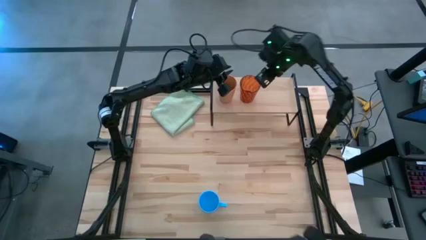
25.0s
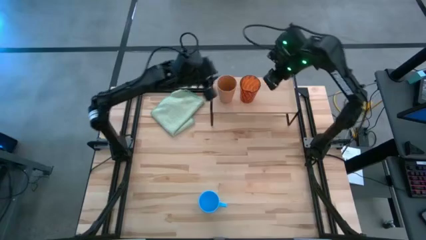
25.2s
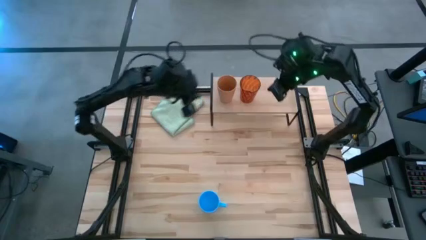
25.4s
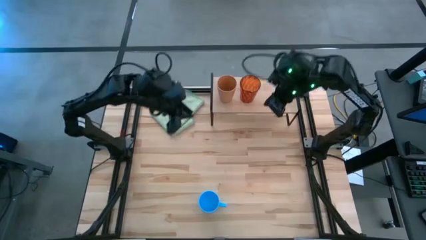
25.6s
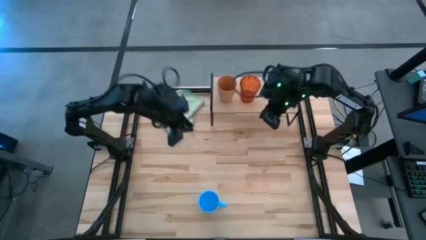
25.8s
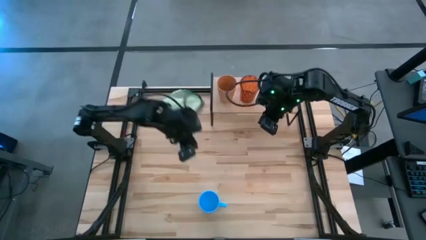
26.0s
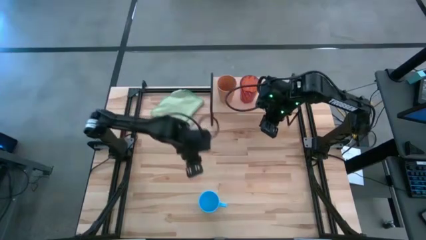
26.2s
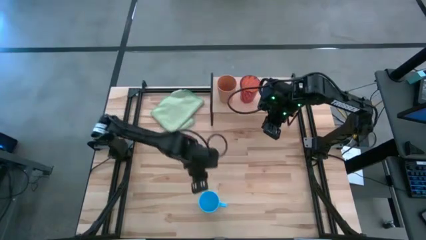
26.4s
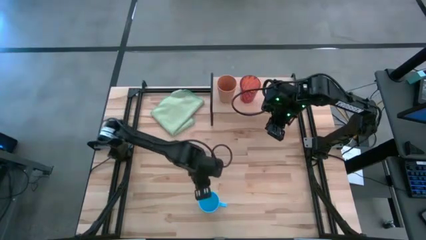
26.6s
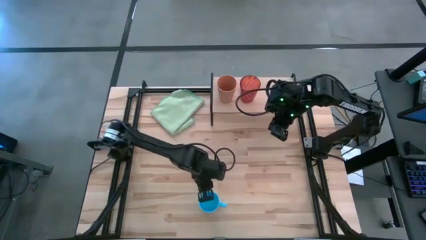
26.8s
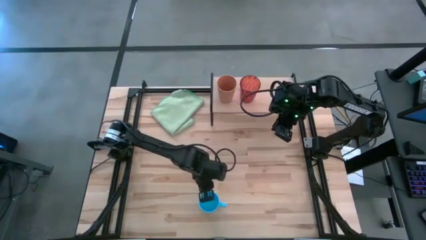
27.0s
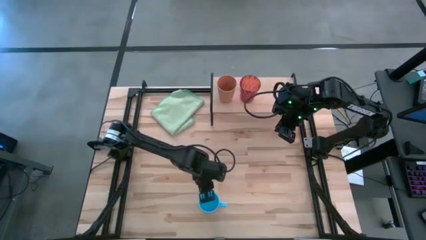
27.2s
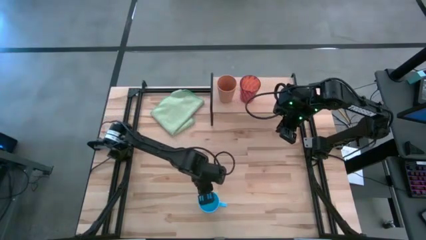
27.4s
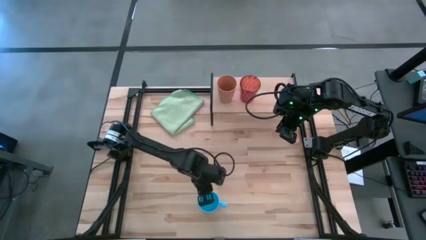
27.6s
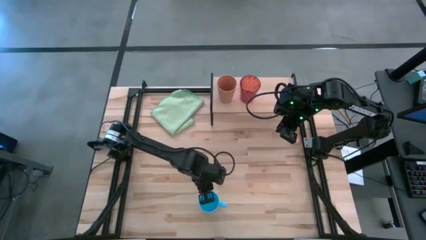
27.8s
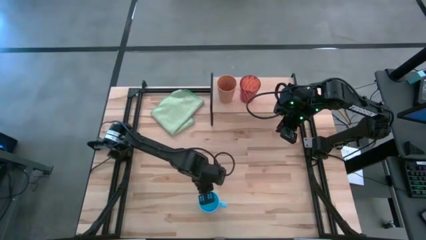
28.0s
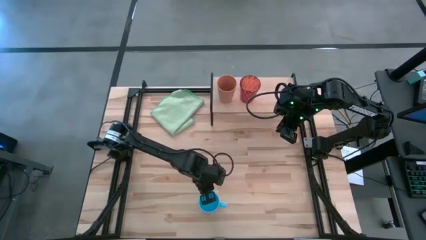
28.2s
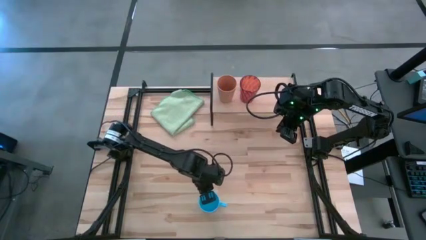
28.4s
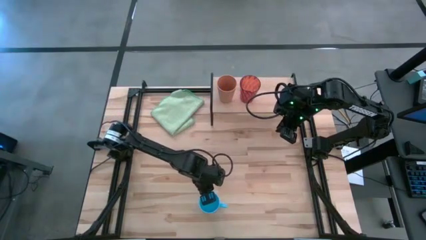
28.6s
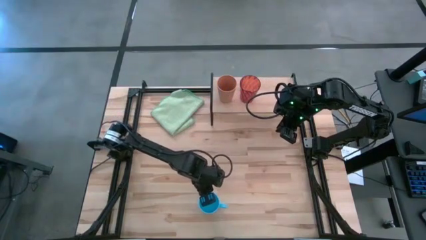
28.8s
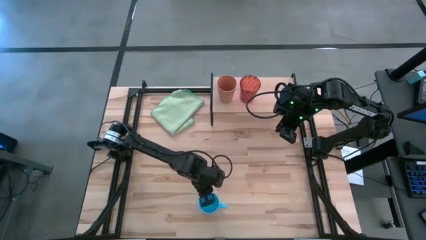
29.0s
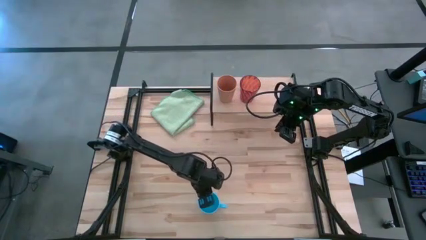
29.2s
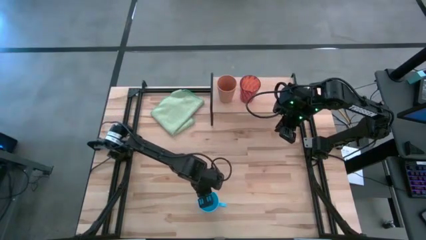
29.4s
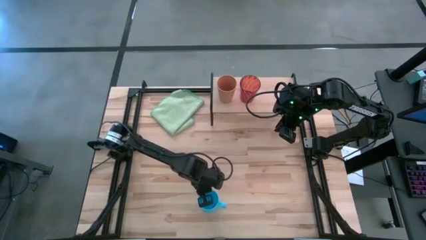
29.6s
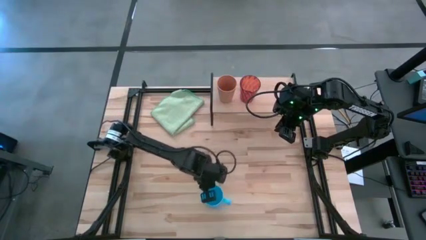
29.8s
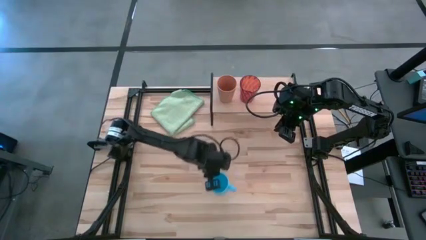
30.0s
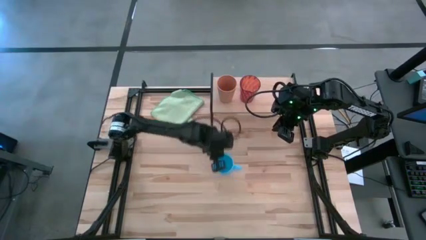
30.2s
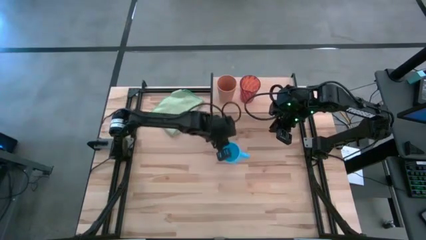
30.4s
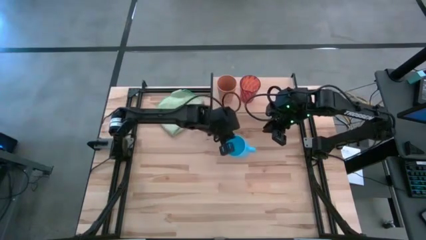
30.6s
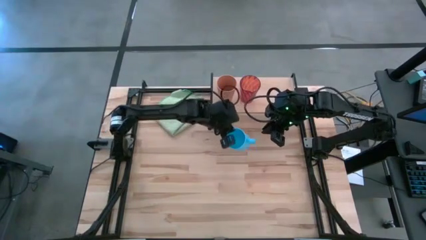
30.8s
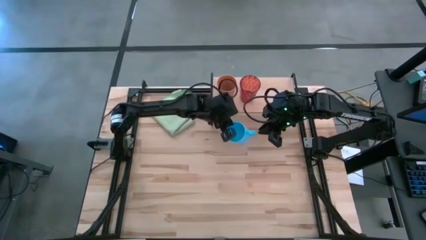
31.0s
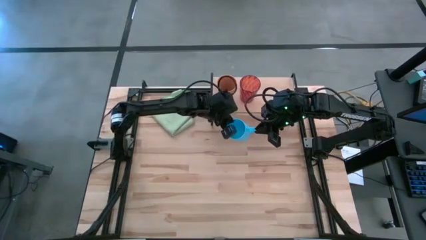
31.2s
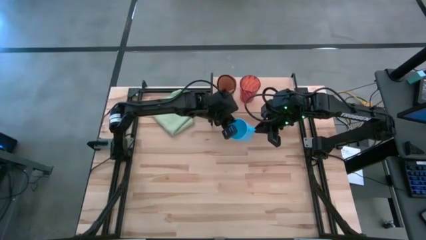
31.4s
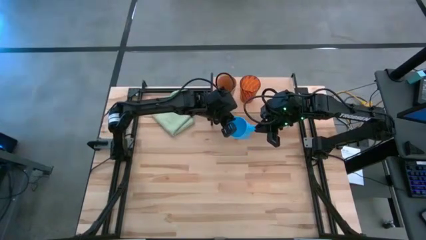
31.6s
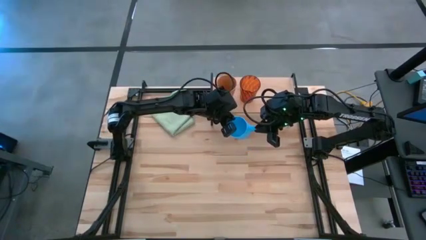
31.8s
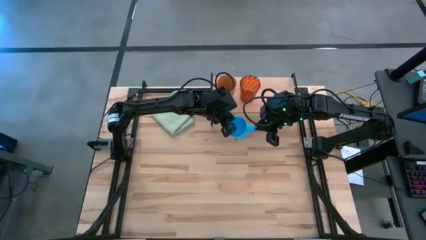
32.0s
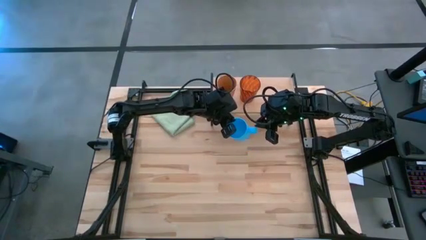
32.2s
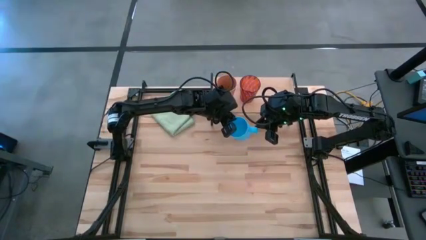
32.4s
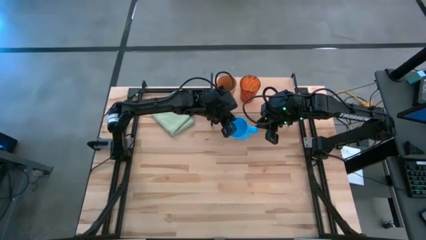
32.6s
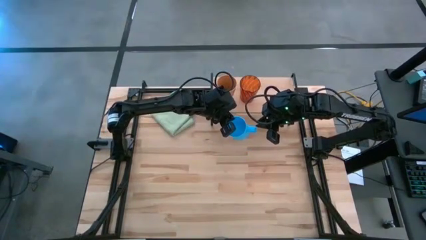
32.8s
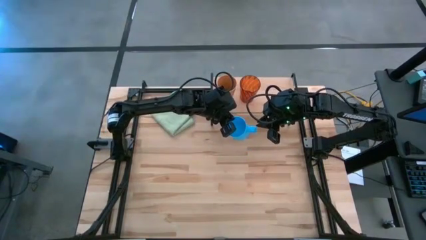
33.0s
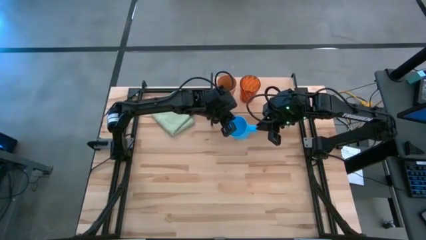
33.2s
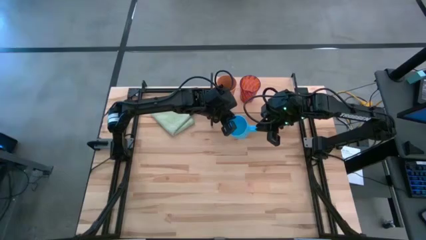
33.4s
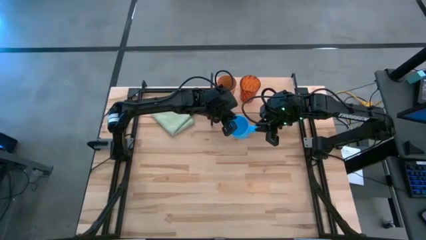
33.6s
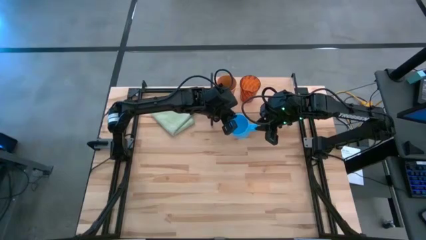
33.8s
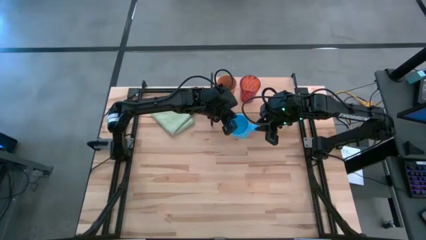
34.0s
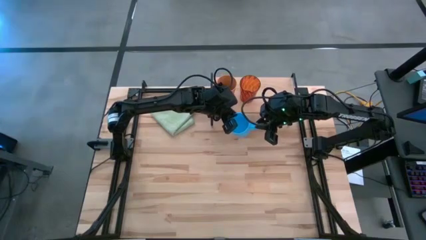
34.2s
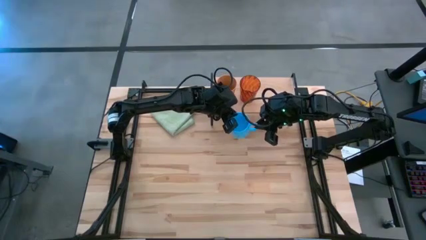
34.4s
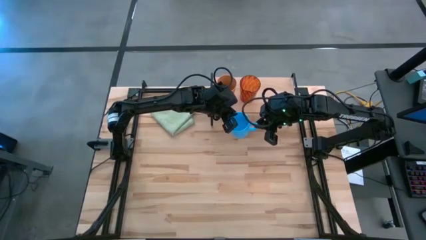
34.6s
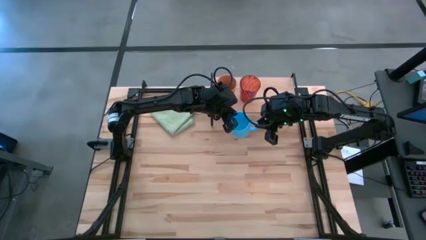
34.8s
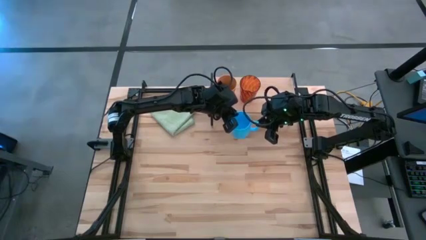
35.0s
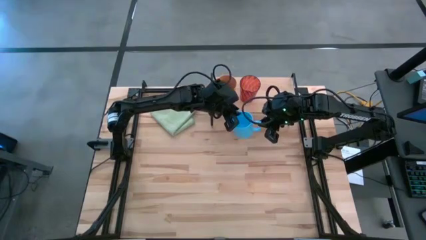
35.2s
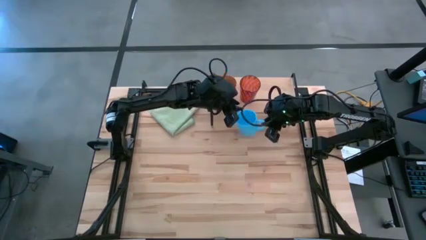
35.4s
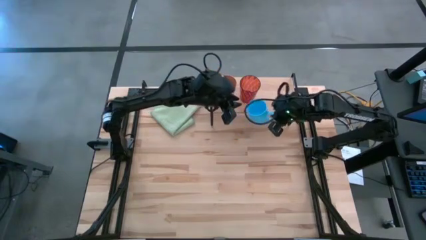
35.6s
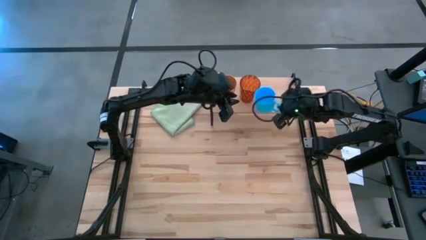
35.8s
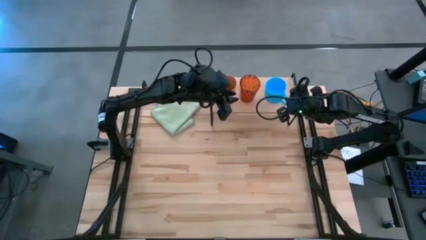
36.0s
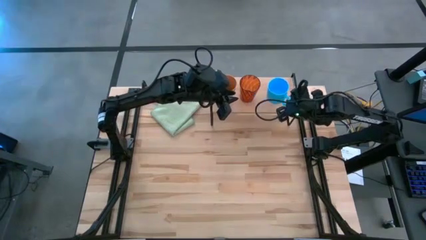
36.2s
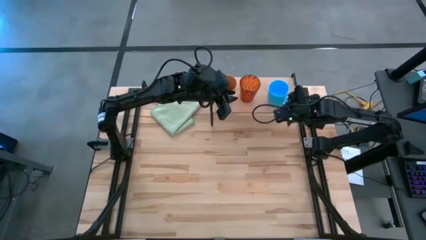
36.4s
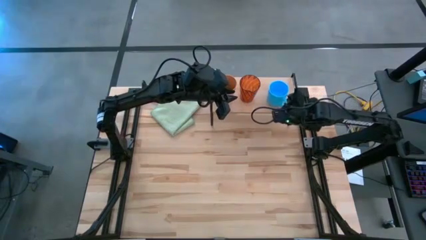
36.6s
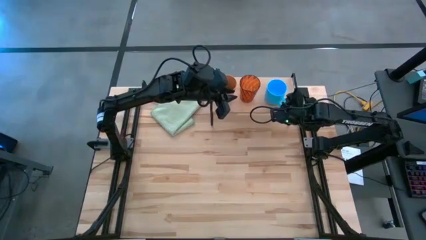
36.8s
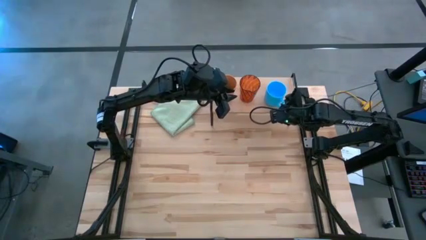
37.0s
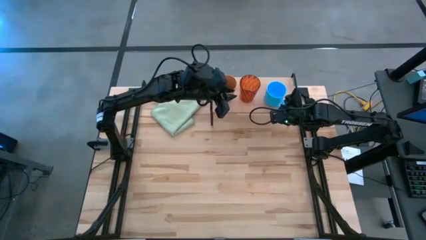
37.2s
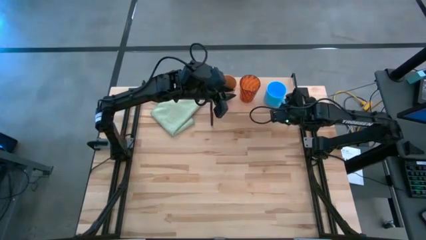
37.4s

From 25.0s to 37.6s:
Task: Stack small to large cups/mugs on shelf
Put the blue mug on the shelf

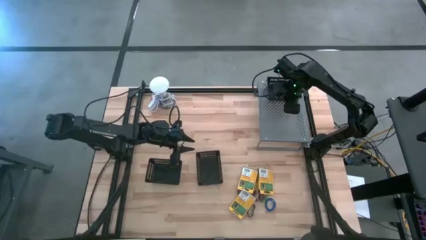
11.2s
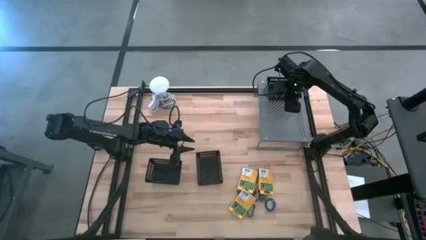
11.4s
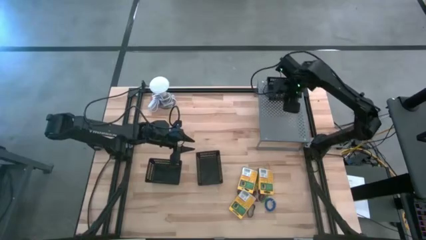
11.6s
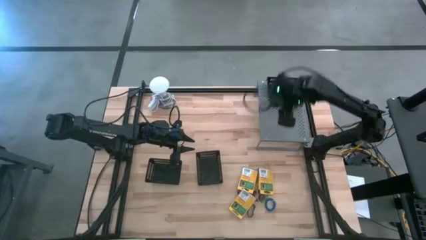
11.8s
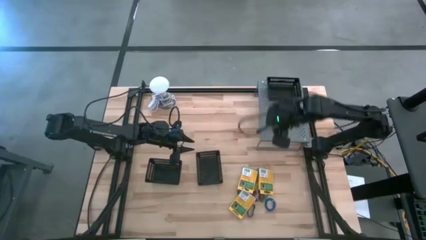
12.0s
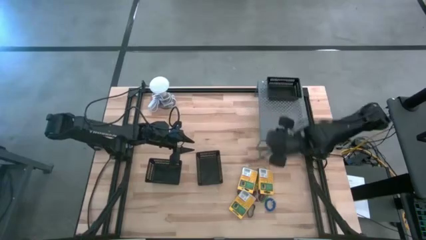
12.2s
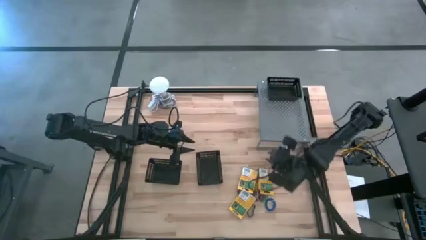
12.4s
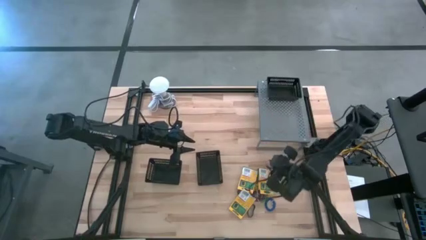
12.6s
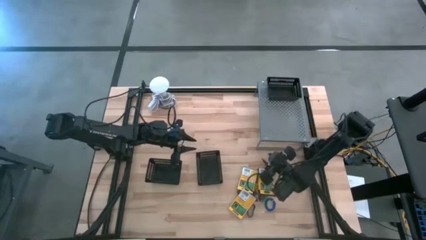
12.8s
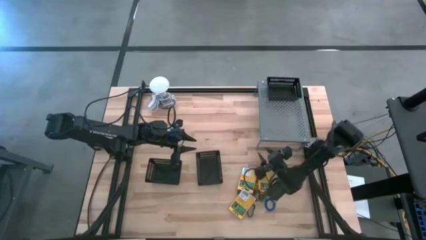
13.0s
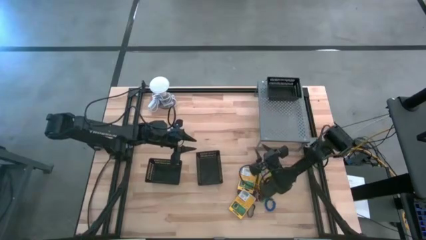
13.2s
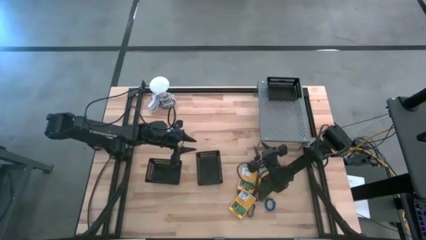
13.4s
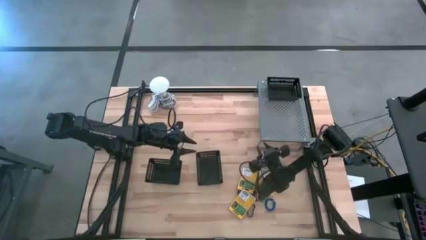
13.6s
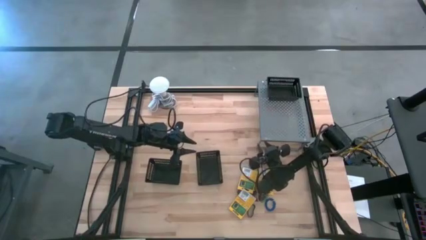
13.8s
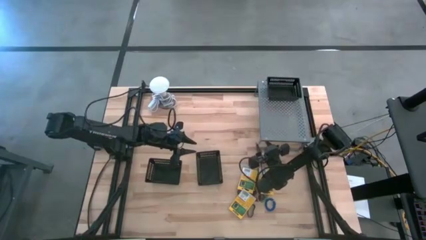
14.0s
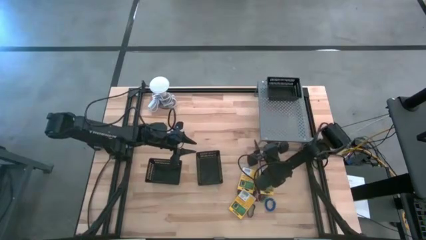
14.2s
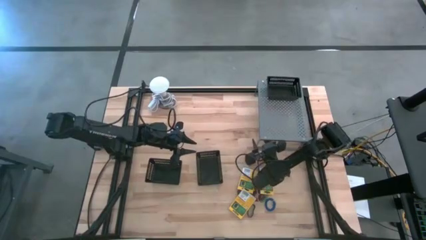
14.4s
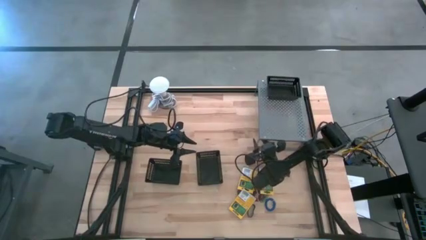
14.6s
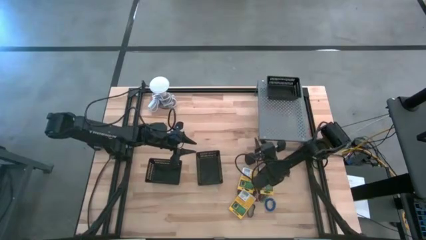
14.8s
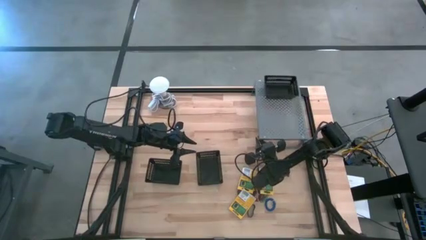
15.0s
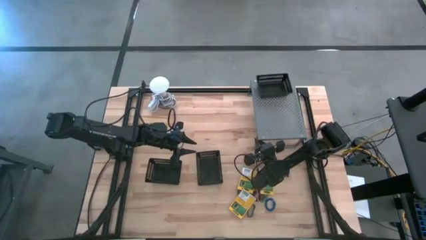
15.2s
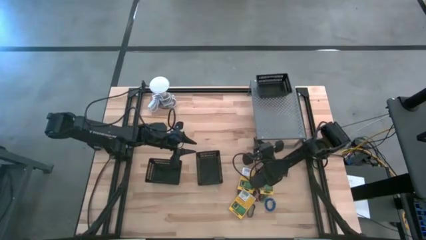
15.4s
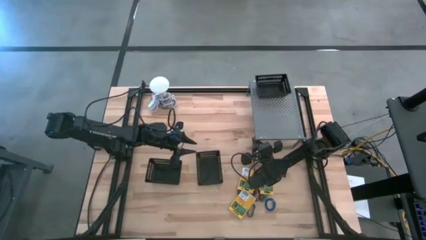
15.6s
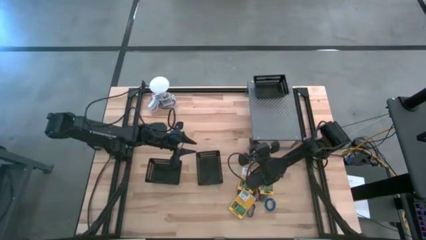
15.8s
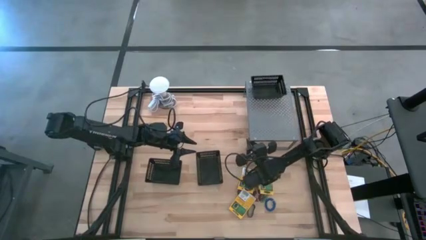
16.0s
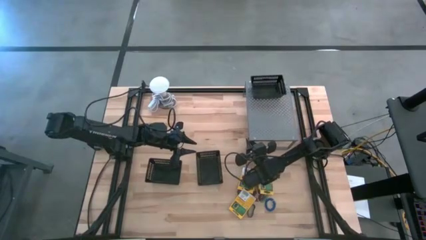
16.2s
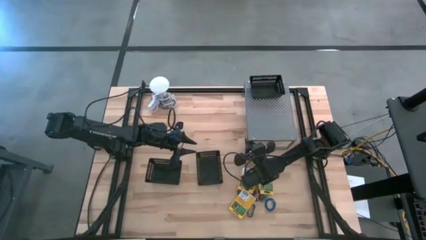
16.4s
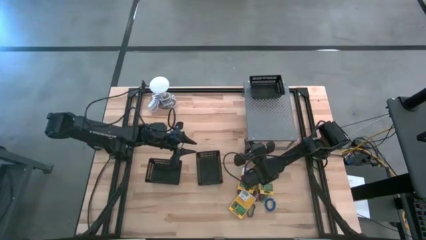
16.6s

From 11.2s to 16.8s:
Task: Pick & Place Office Desk Supplies
Adjust the shelf
